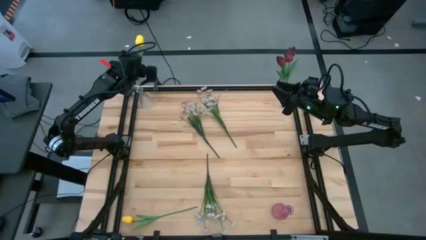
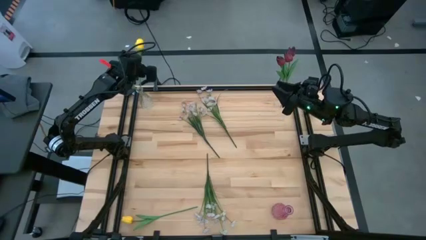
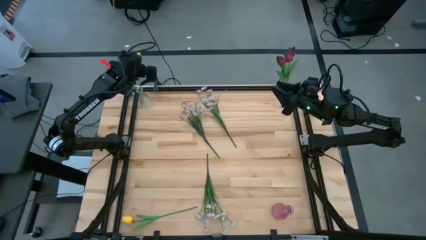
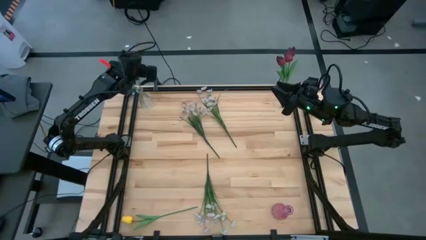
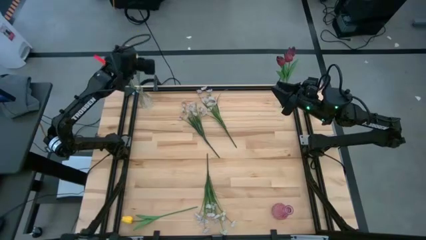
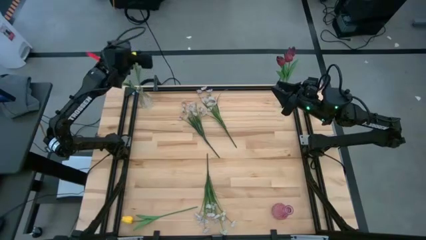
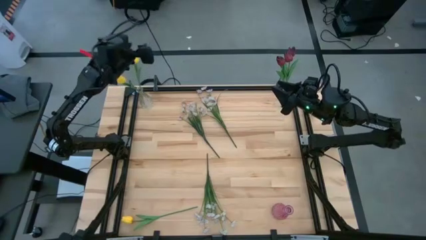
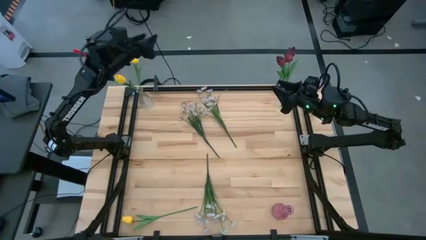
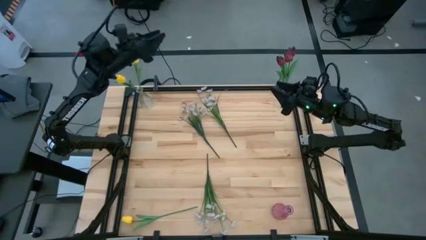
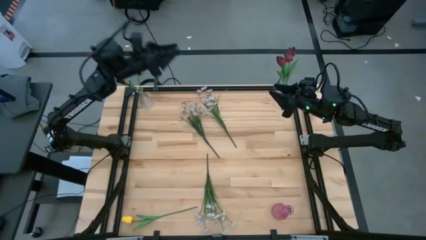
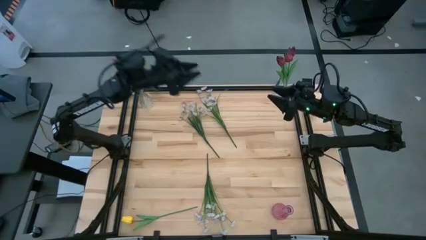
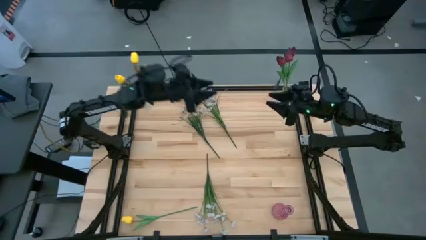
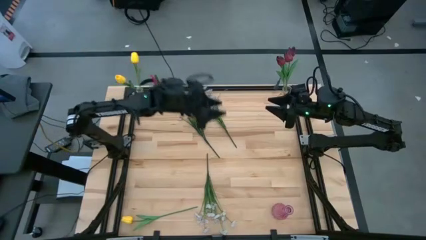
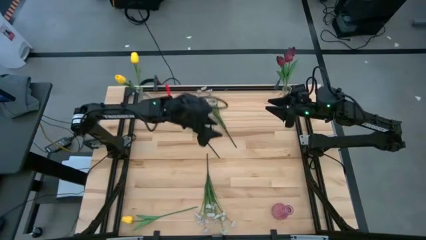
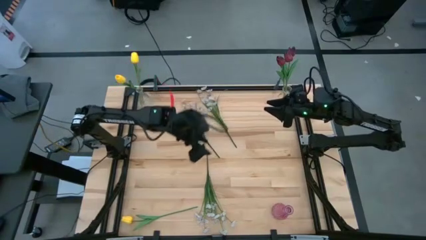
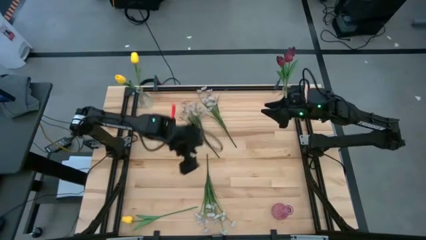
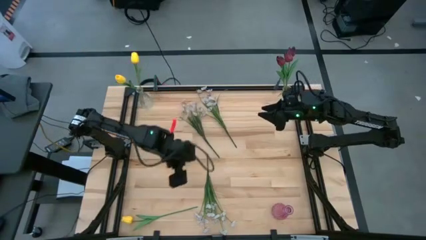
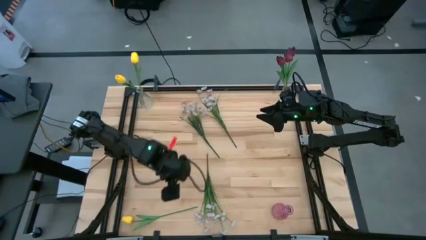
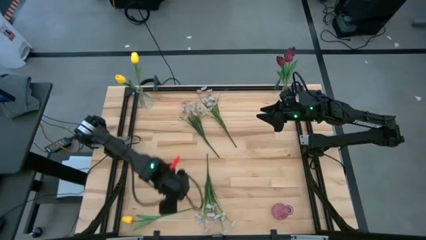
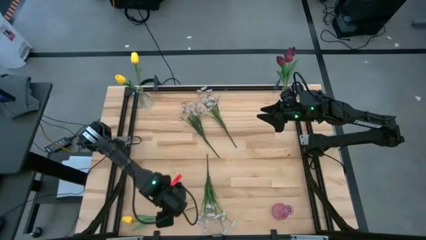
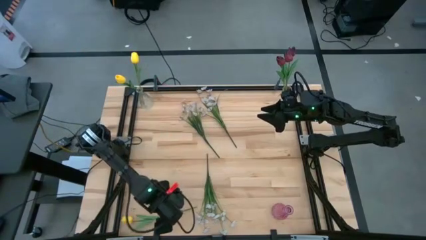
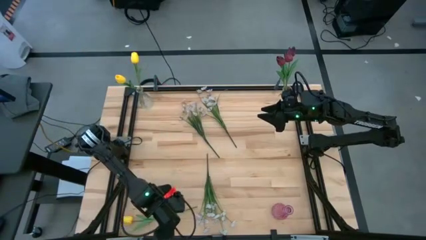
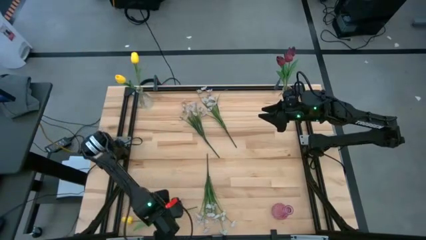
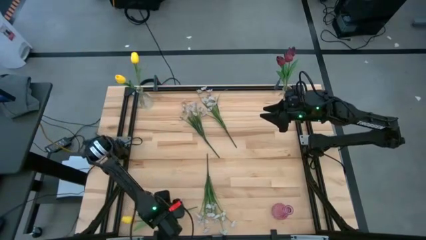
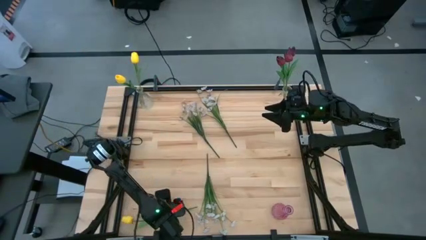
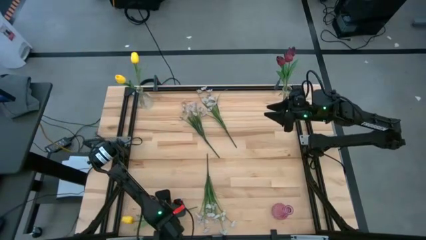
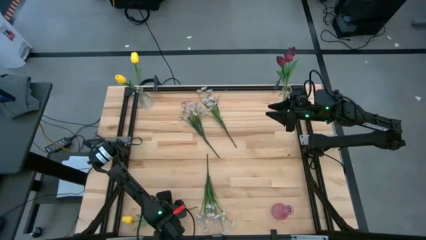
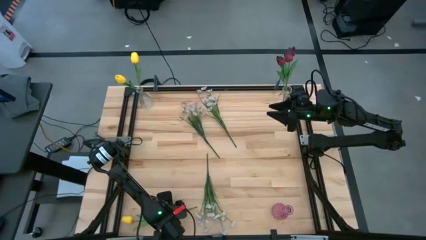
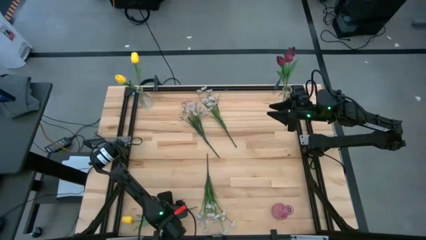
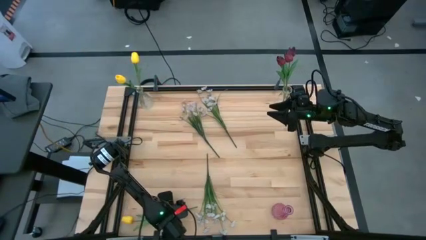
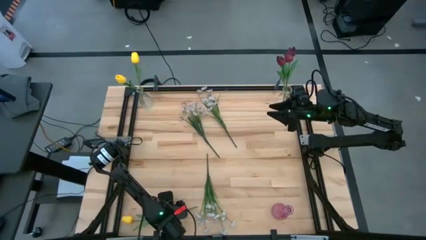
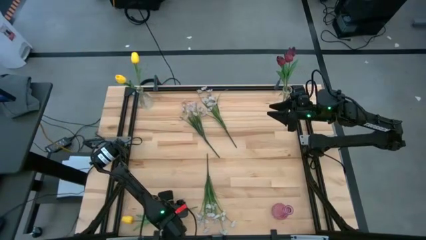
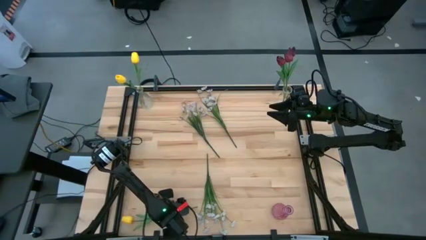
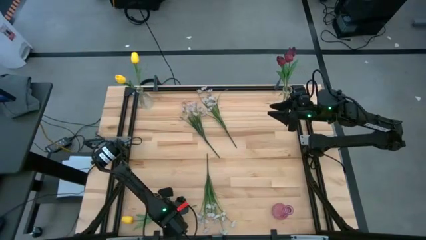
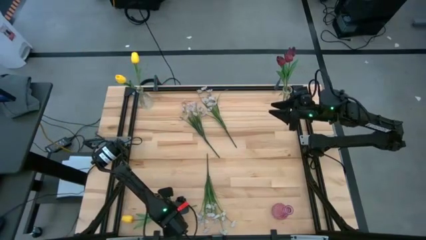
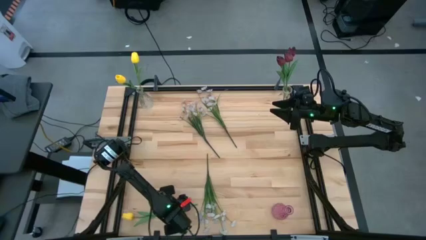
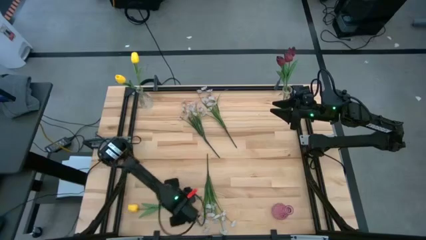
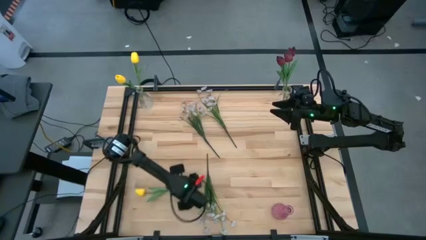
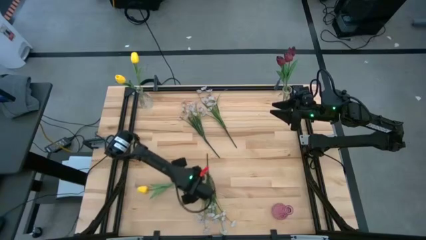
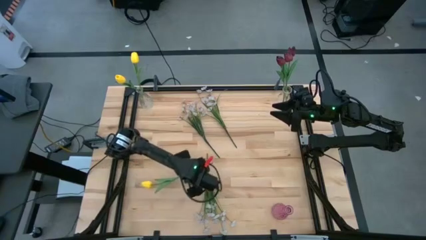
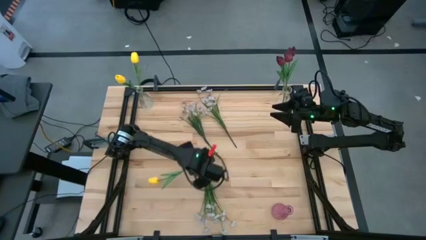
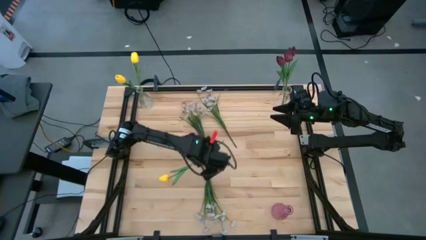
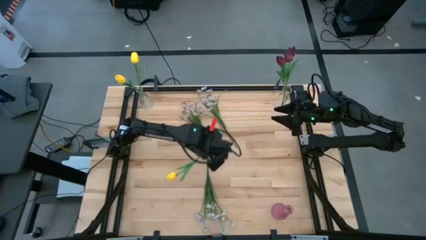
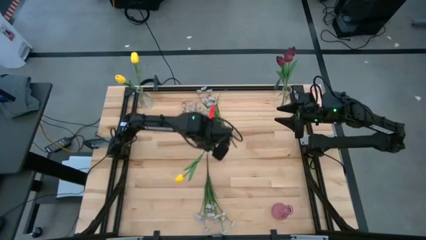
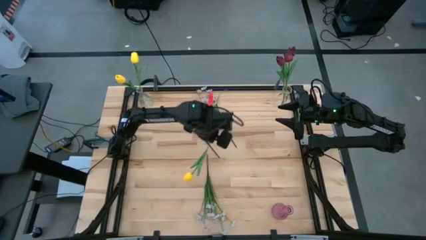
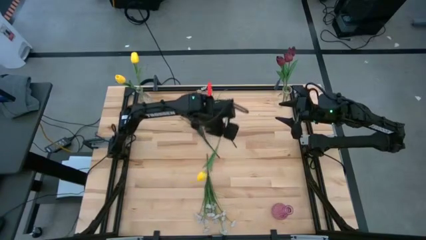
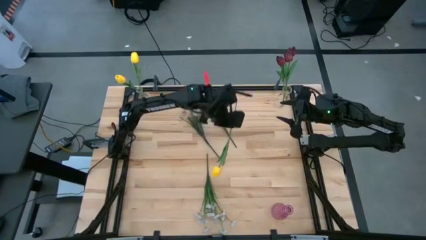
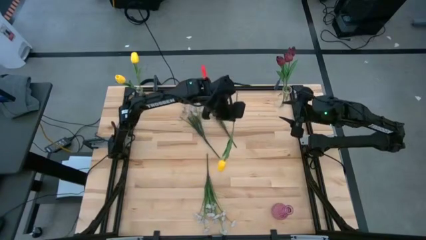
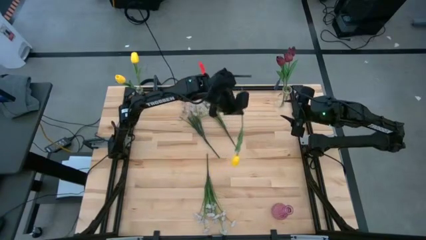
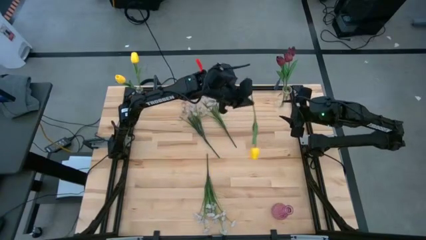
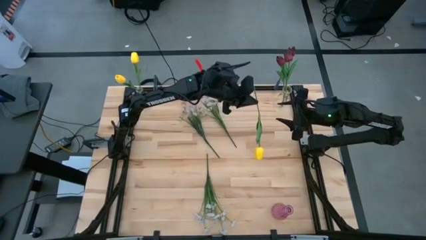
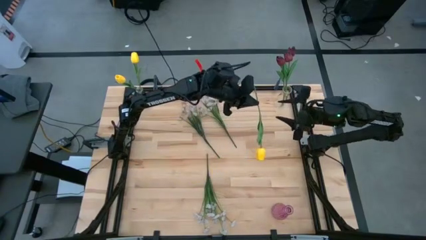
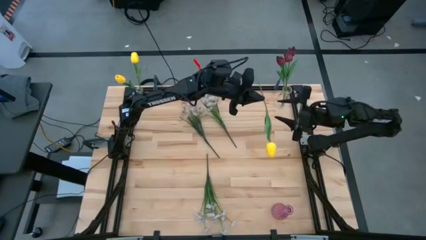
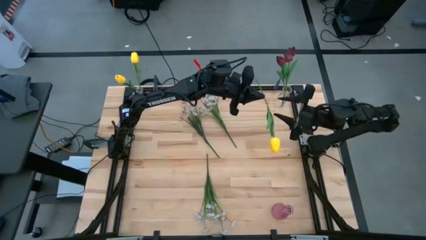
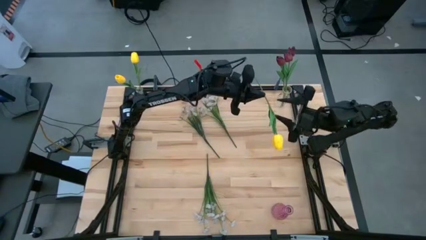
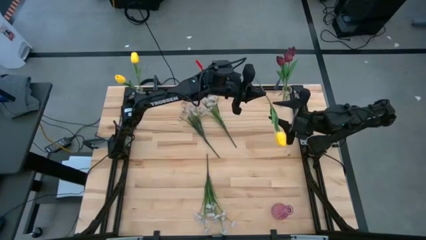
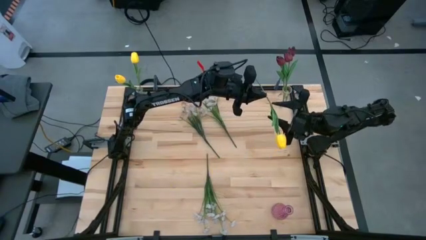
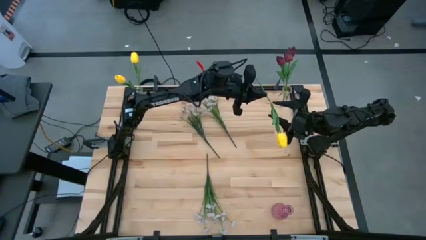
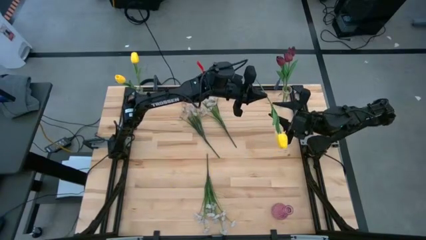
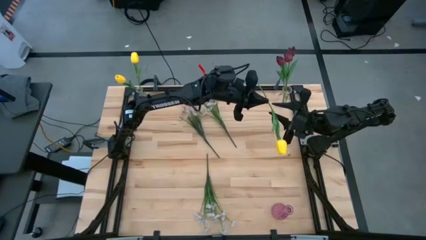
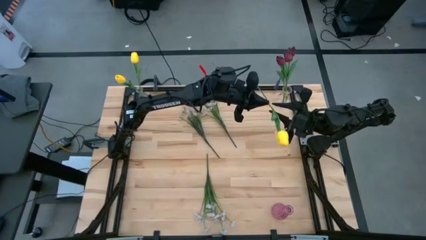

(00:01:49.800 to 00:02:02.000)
Task: Sort flowers into vase by color
Put the yellow flower into the left transparent vase
